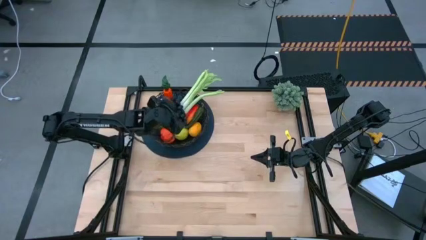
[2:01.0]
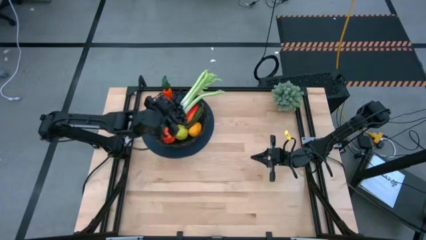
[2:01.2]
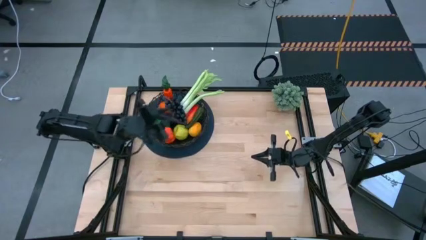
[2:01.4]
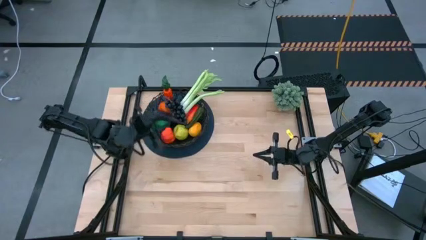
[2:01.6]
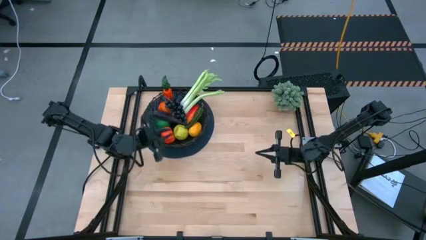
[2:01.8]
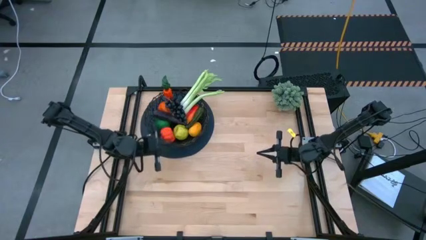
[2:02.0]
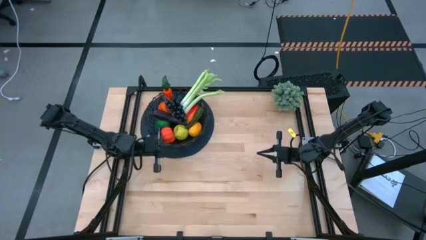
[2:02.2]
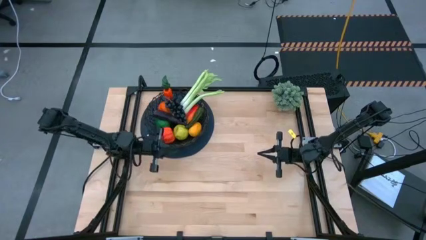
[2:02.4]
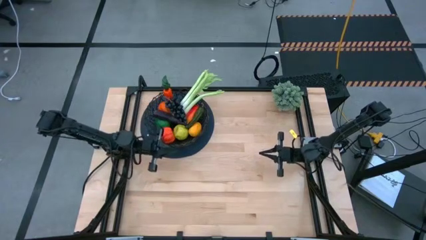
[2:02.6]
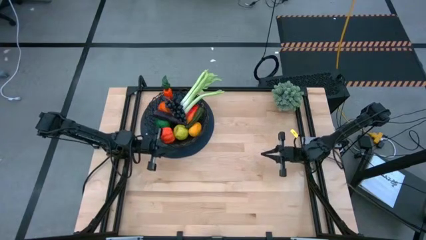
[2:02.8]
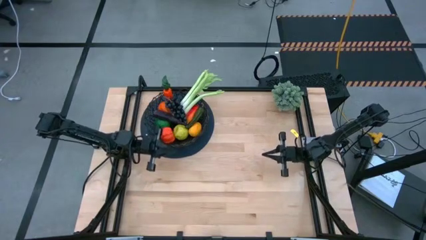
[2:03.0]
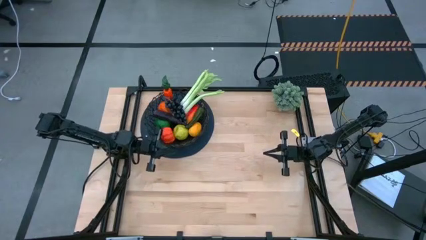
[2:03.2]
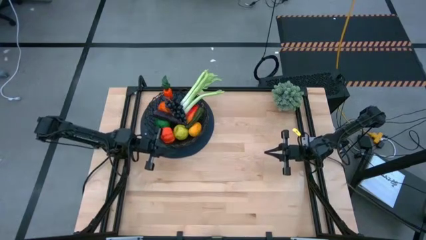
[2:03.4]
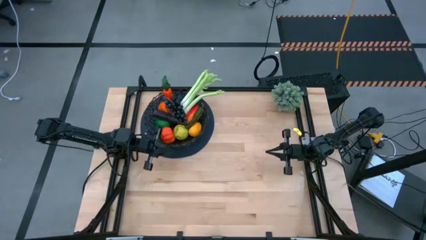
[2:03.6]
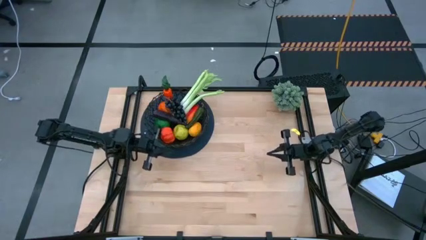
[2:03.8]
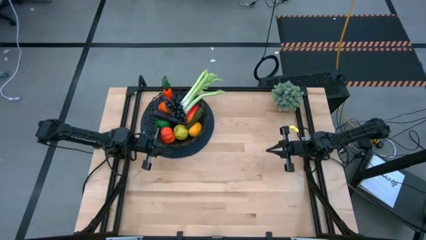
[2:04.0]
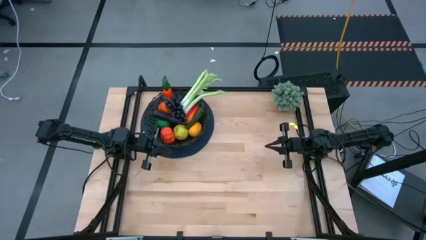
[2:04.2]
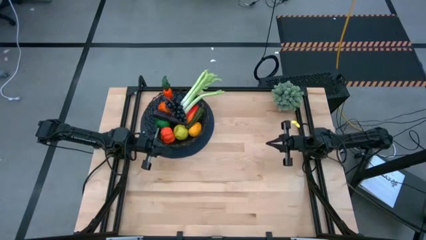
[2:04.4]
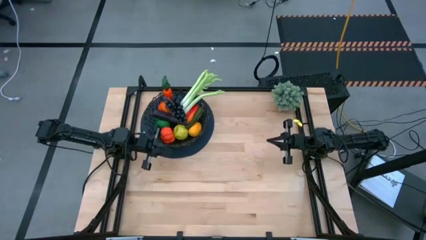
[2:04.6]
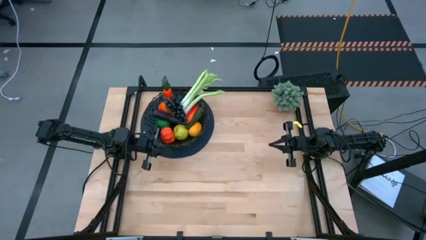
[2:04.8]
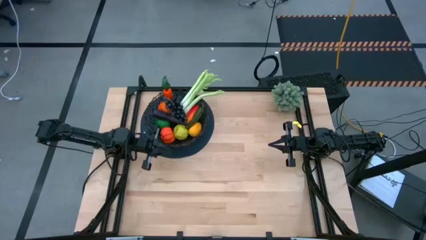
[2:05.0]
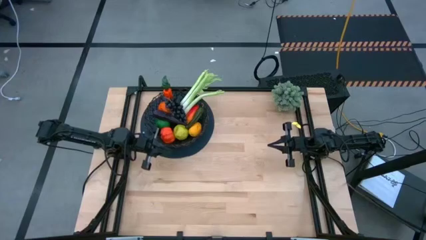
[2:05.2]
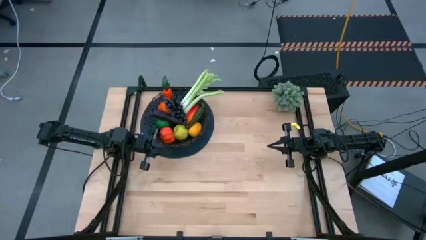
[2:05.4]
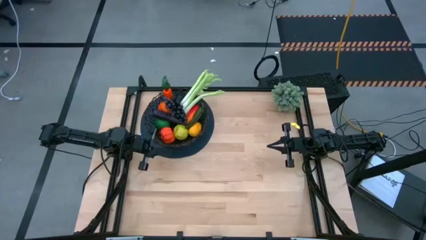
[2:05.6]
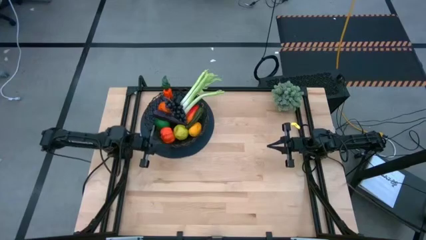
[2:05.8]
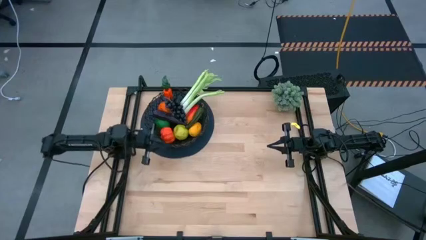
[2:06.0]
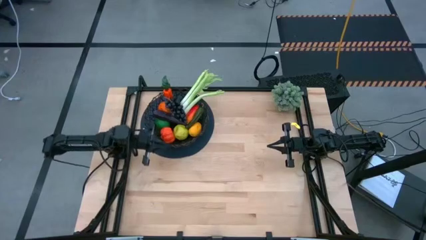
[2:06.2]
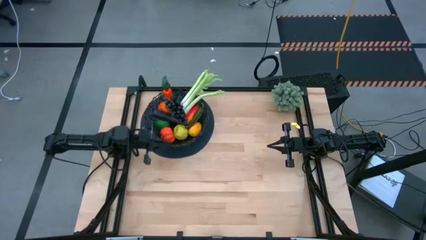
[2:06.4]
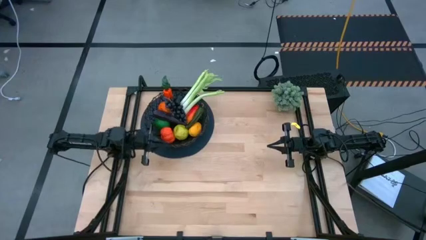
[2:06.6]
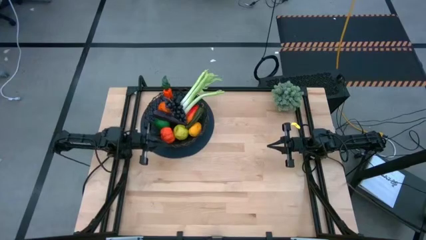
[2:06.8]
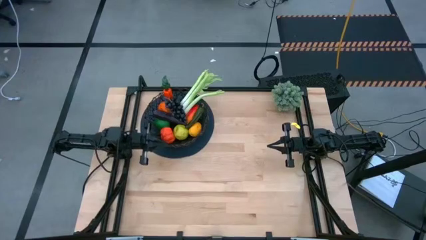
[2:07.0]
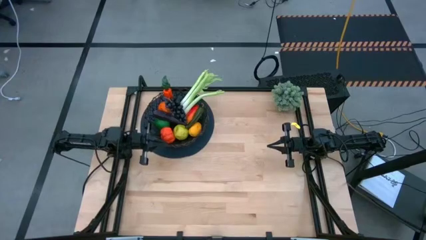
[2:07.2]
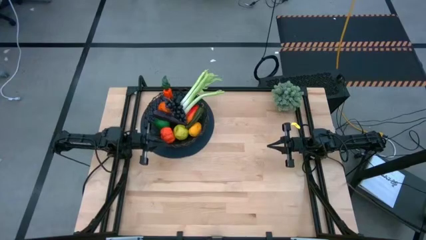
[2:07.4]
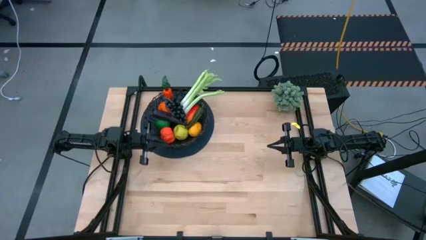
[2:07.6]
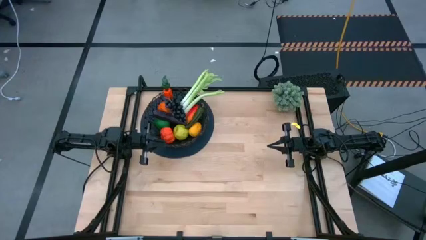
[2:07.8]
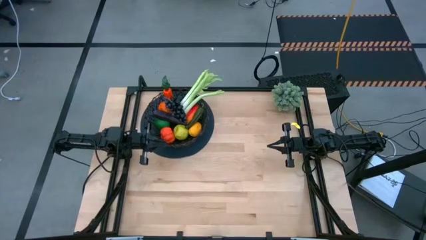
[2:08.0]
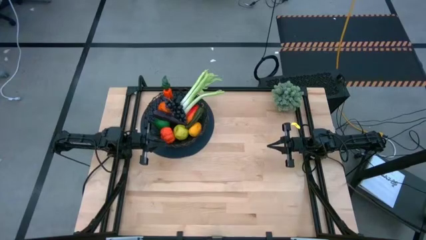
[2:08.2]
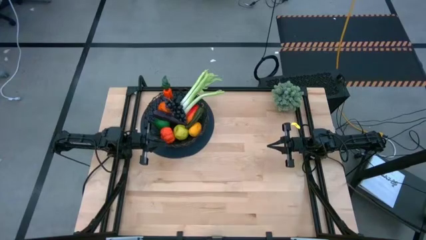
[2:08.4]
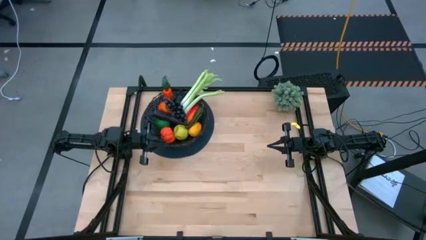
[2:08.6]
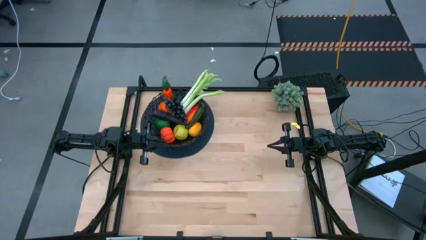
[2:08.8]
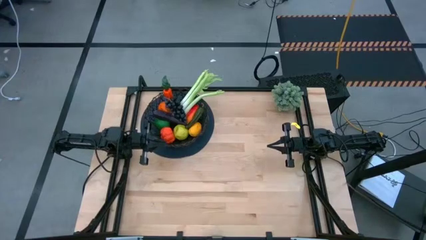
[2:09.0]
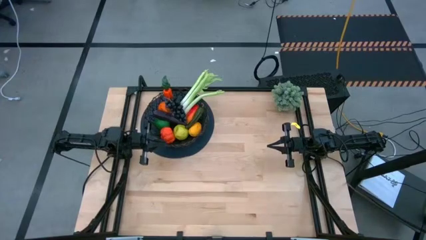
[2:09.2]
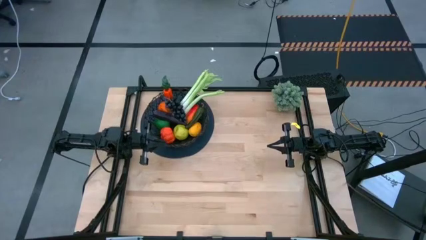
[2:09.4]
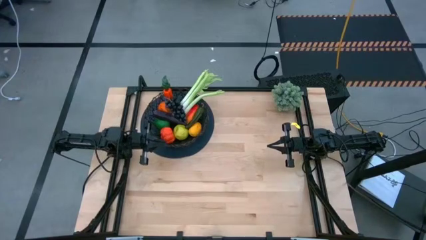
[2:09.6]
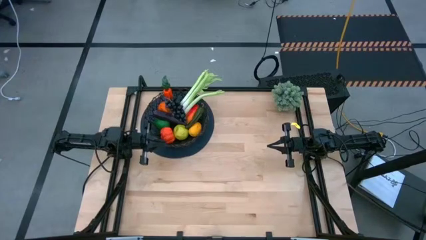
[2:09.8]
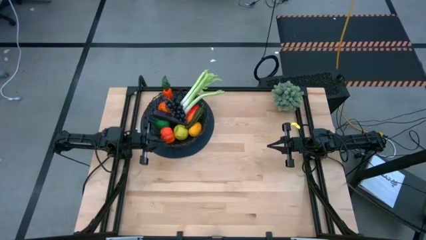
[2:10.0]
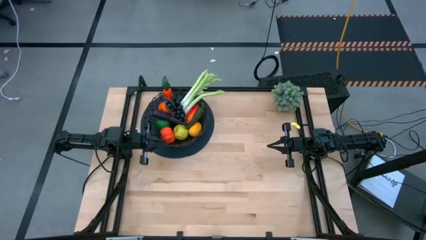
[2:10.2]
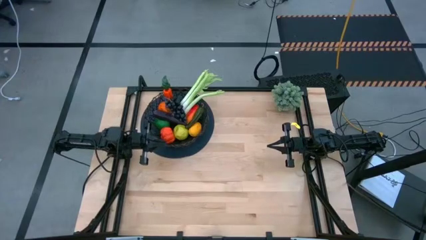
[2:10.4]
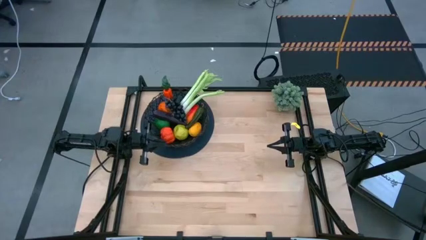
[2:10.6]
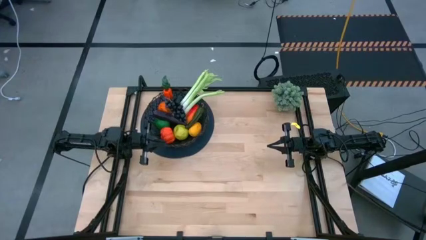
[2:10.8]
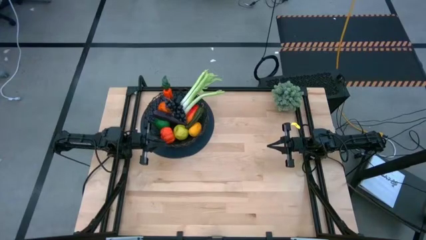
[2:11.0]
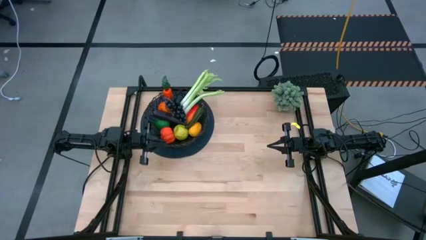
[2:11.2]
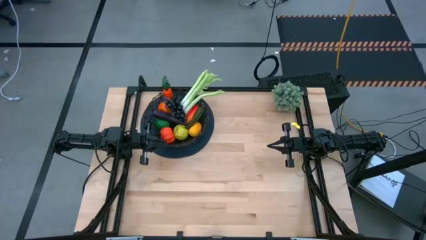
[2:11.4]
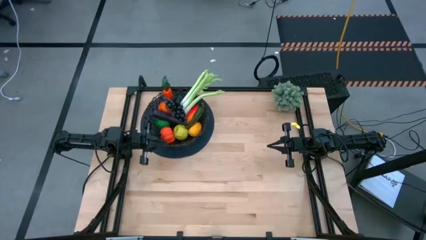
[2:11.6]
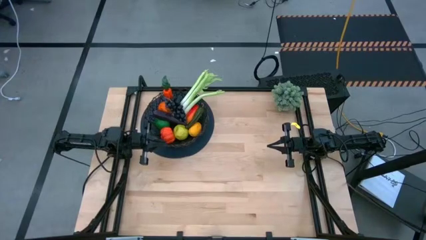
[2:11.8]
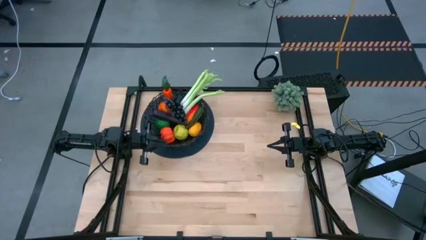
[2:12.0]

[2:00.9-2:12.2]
Task: Build produce basket
Return to Home Position

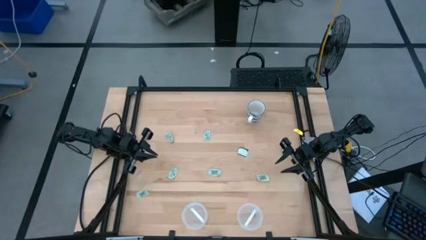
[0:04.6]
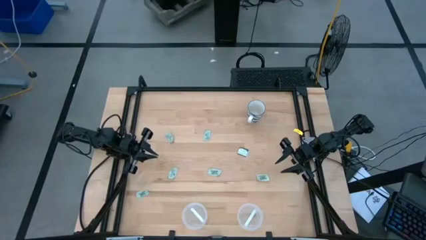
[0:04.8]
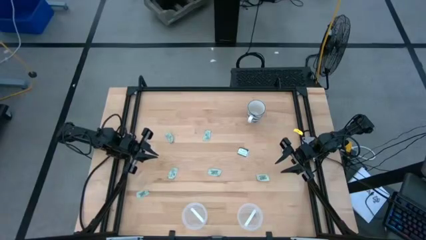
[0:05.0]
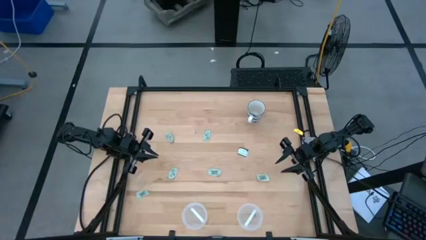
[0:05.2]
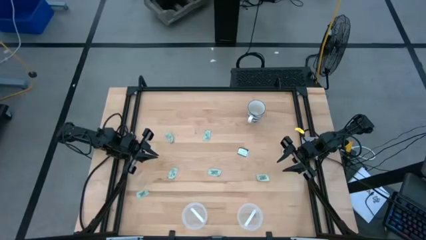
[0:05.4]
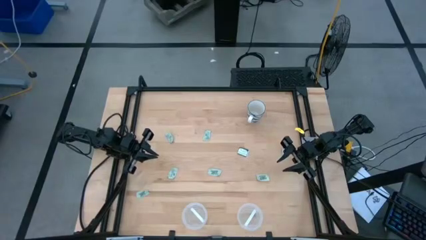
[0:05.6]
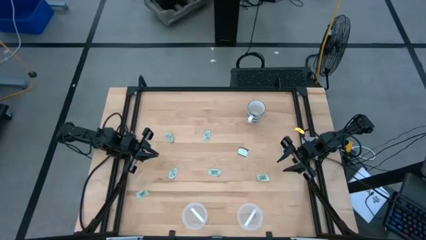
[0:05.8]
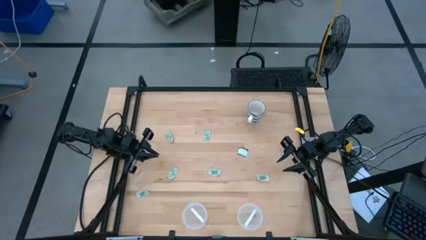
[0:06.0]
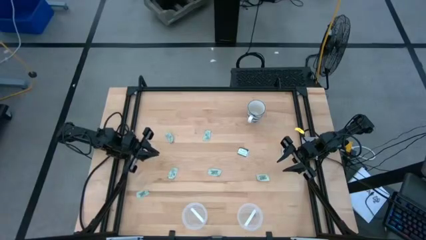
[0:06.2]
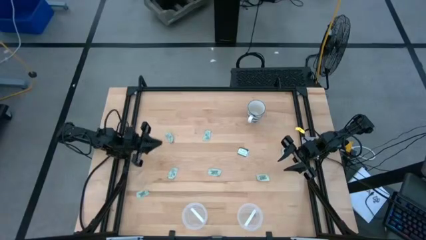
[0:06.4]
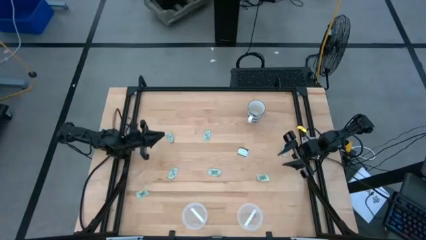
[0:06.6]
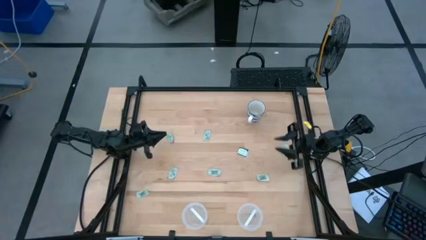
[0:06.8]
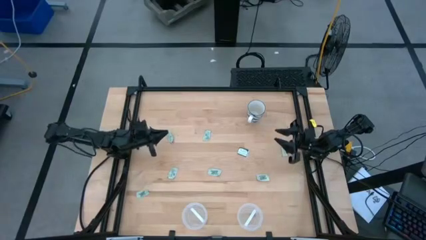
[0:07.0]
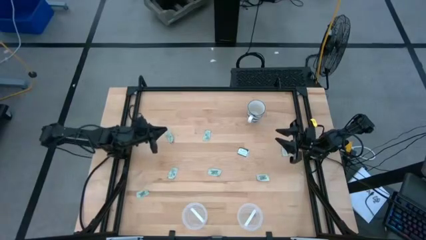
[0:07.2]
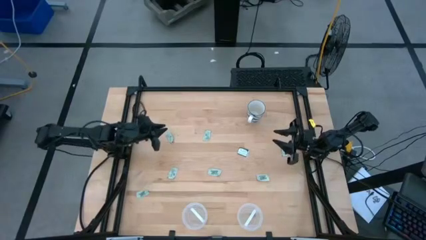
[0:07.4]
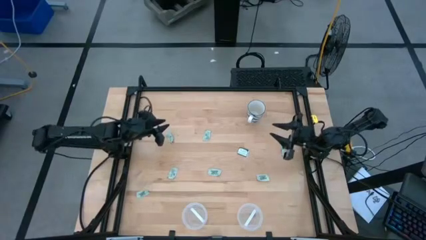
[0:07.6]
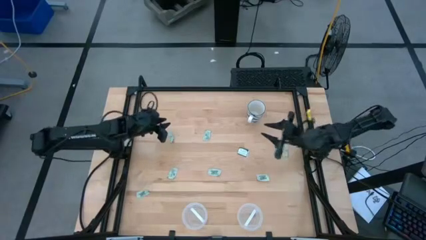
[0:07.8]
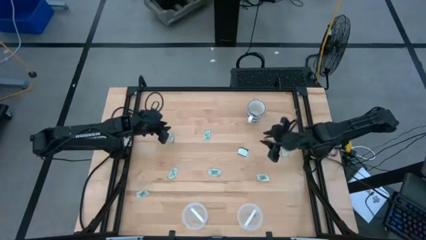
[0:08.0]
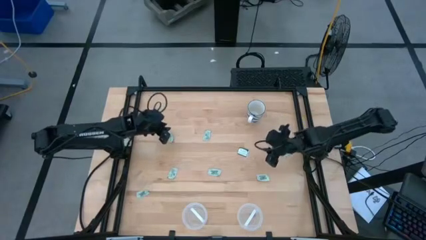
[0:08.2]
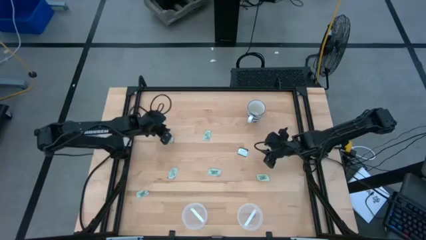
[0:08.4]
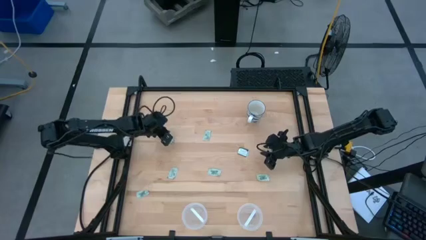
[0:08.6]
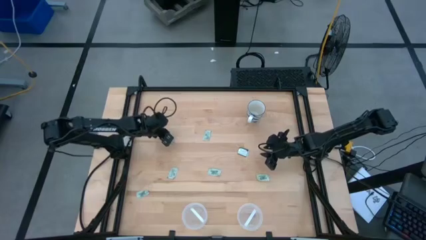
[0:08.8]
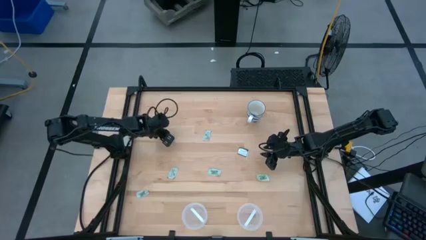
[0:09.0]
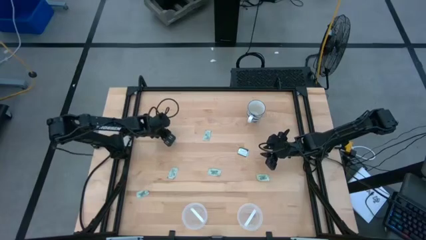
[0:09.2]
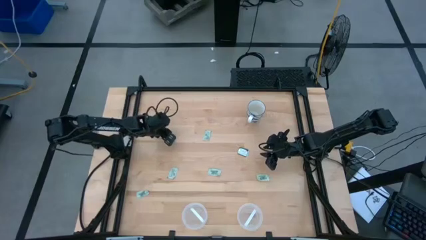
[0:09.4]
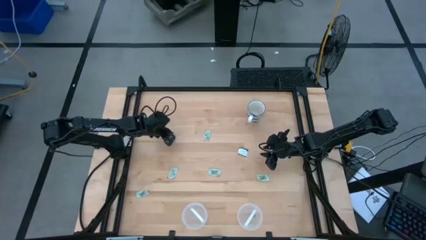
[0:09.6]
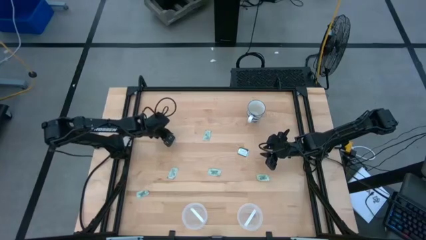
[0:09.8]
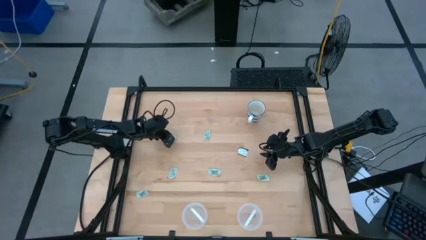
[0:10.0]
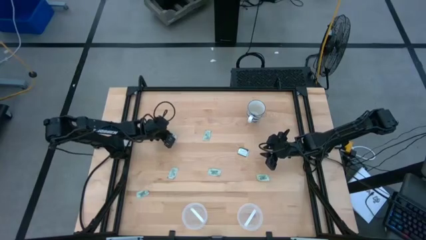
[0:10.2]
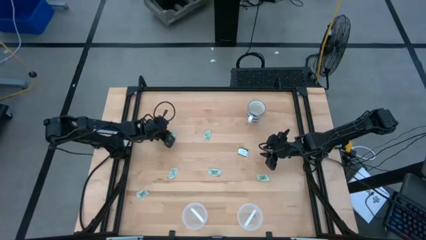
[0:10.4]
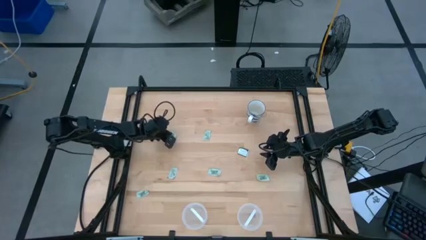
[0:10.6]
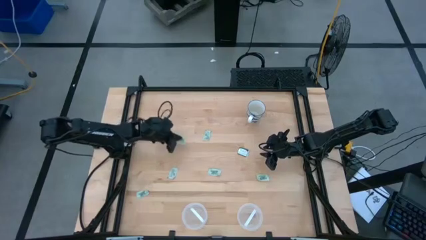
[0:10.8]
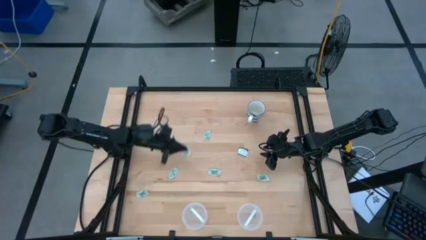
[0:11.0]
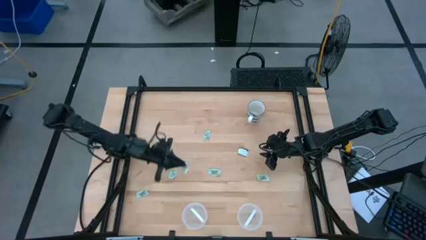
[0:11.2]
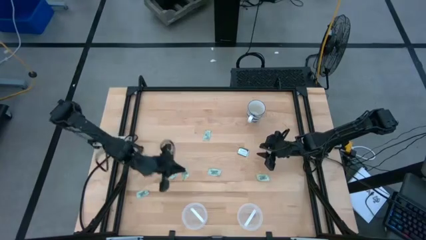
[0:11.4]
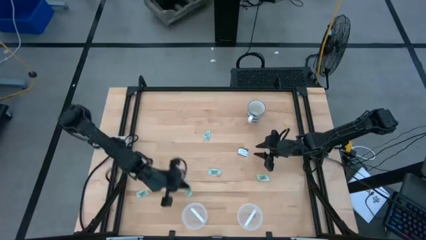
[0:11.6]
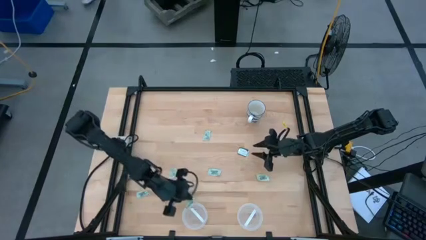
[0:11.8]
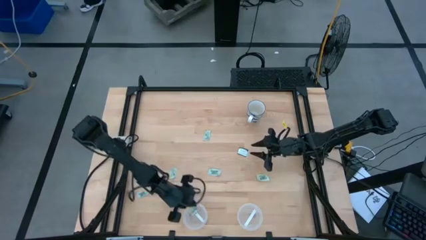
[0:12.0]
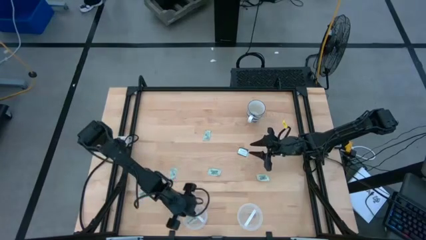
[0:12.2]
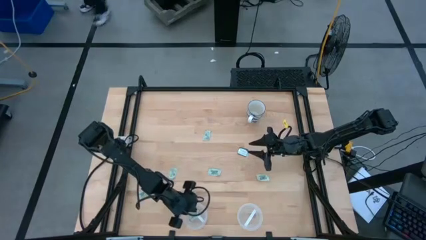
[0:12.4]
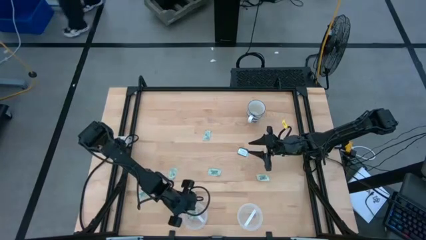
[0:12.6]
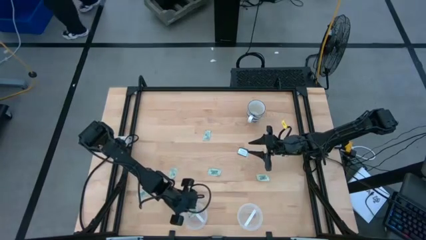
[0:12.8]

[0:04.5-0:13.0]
Task: Pick and place Stevia / Truvia into bins
Put the white stevia packet into the left transparent container
